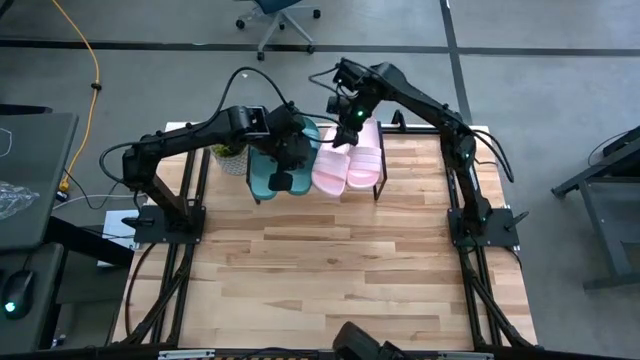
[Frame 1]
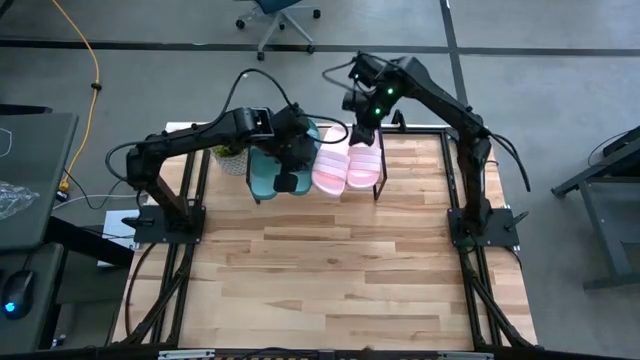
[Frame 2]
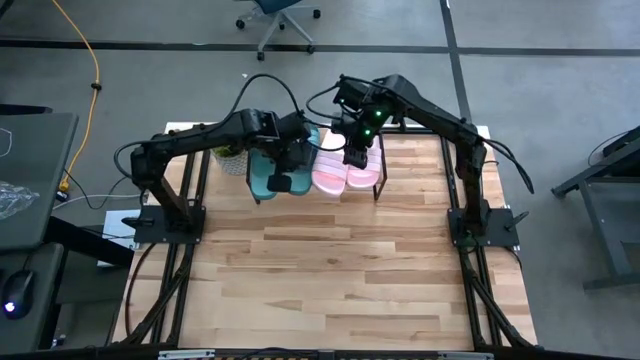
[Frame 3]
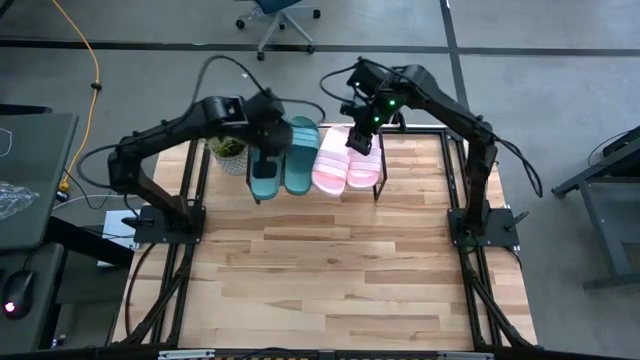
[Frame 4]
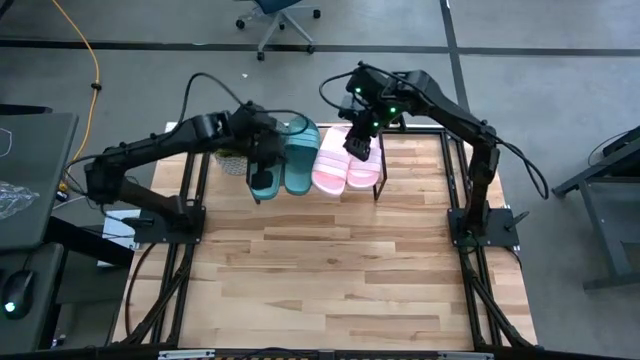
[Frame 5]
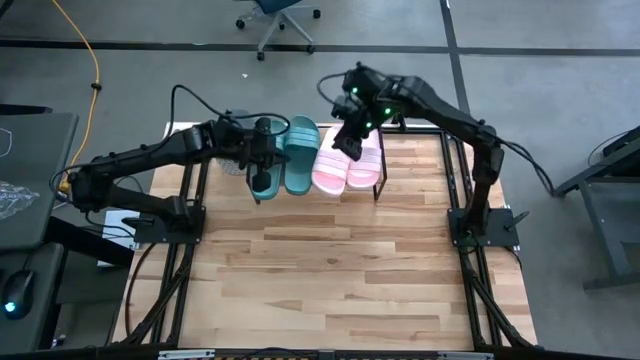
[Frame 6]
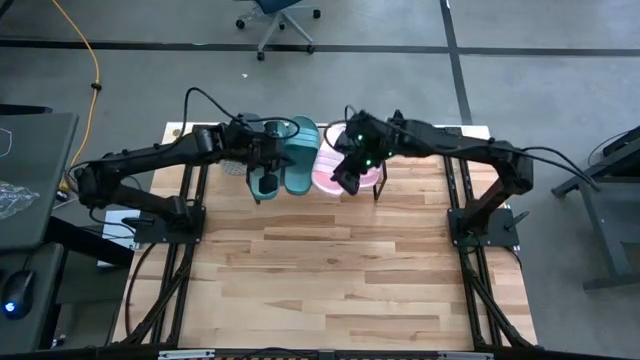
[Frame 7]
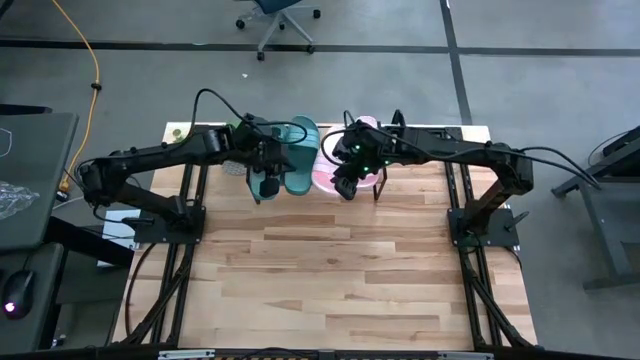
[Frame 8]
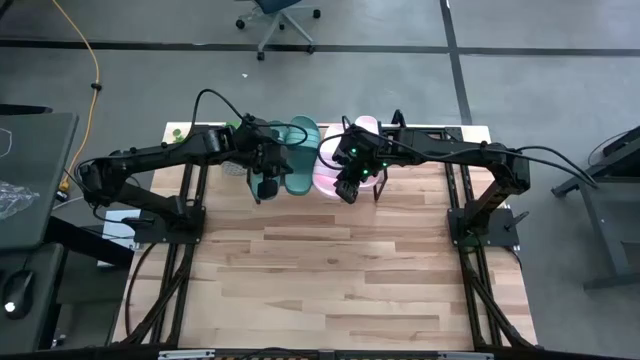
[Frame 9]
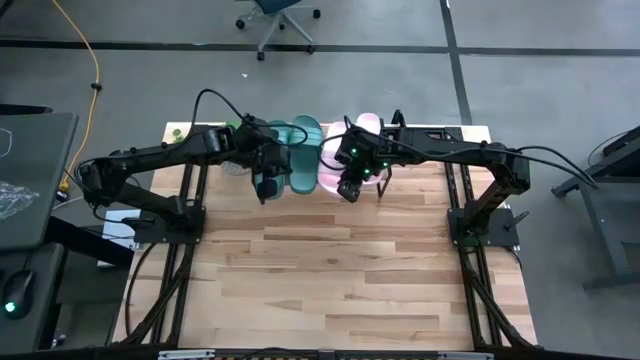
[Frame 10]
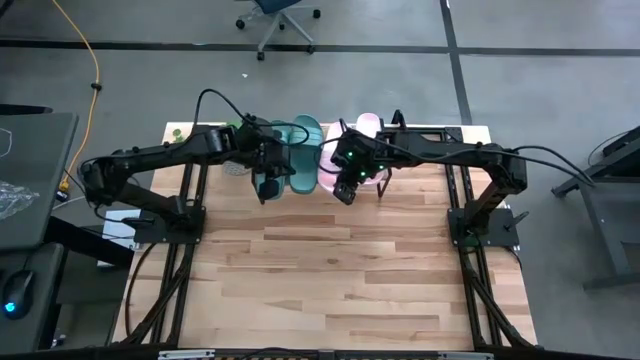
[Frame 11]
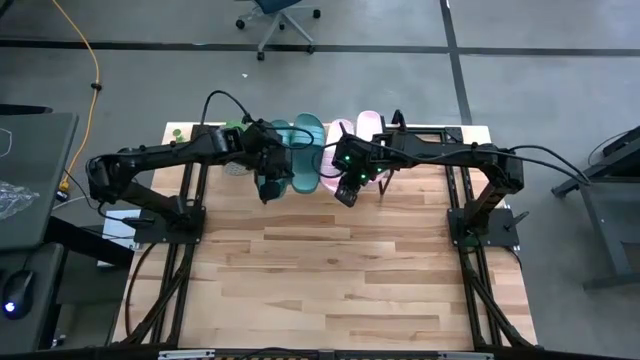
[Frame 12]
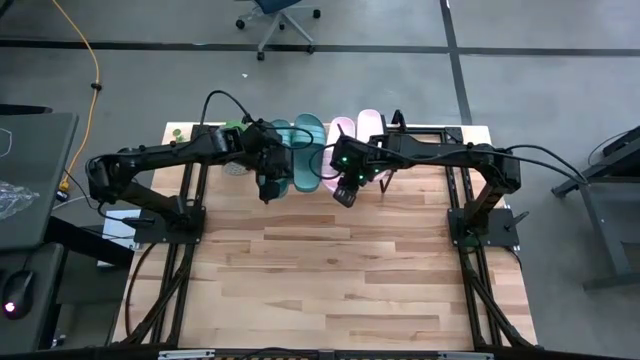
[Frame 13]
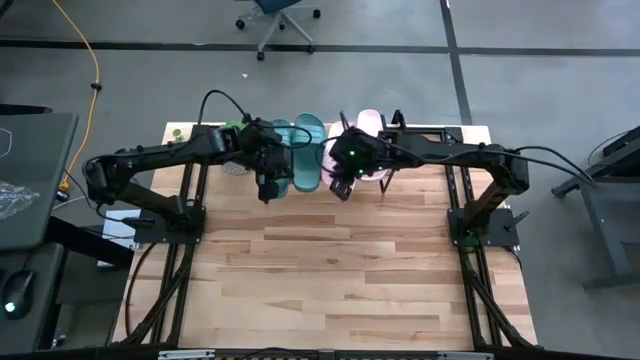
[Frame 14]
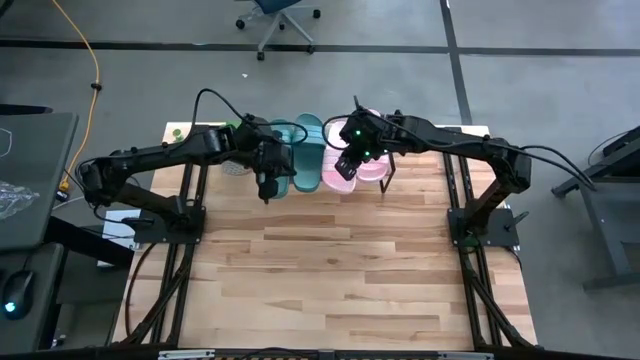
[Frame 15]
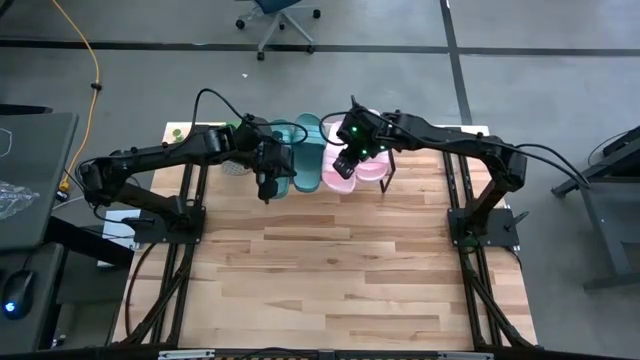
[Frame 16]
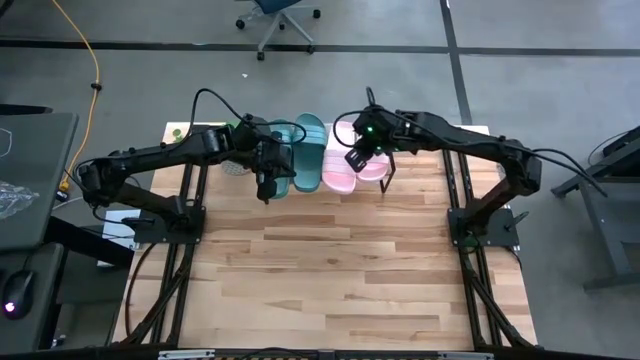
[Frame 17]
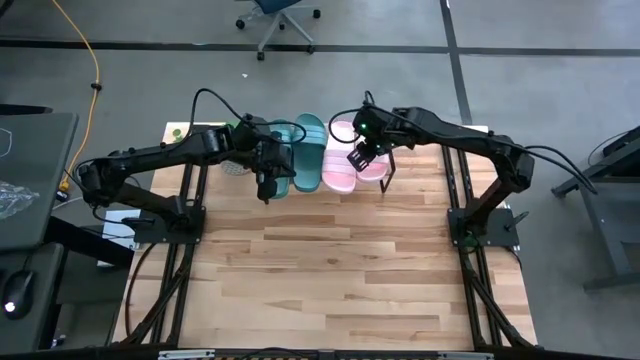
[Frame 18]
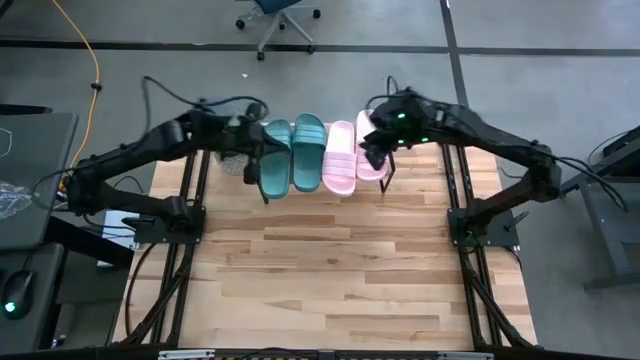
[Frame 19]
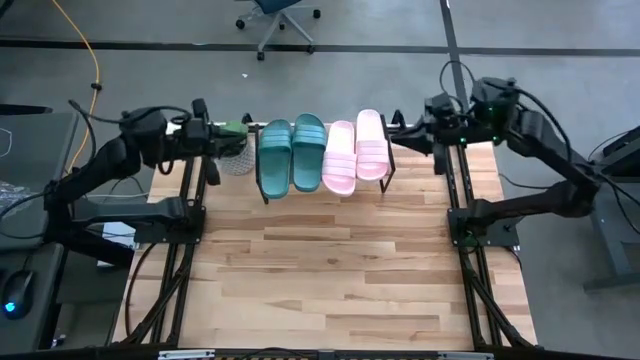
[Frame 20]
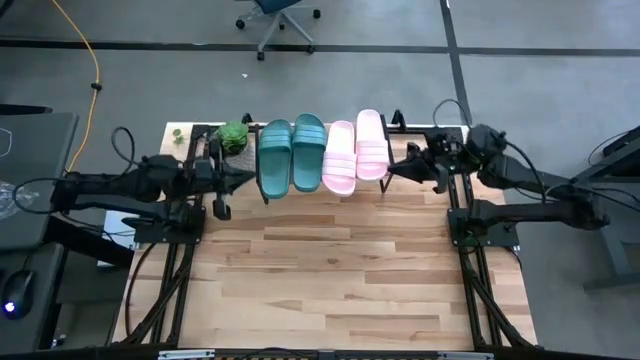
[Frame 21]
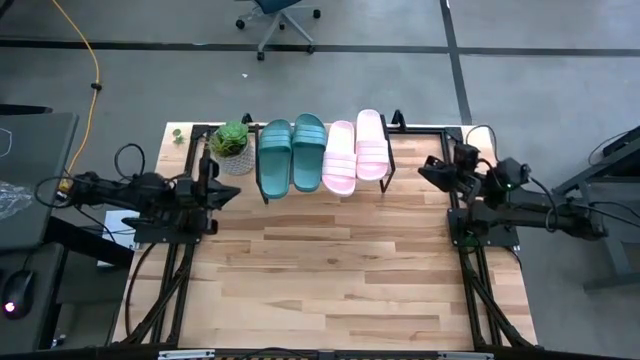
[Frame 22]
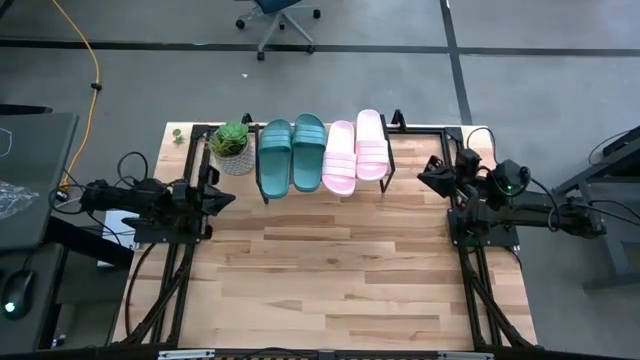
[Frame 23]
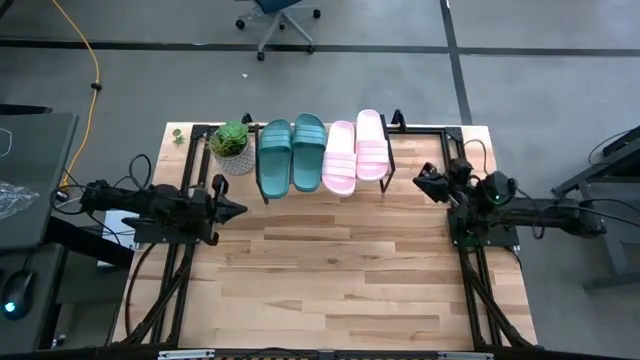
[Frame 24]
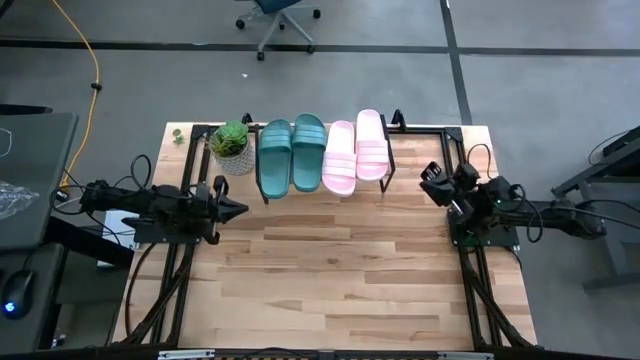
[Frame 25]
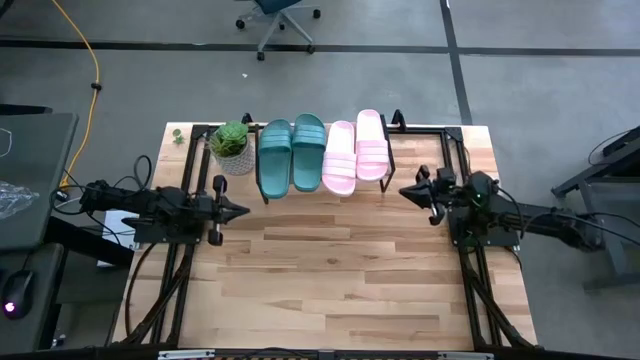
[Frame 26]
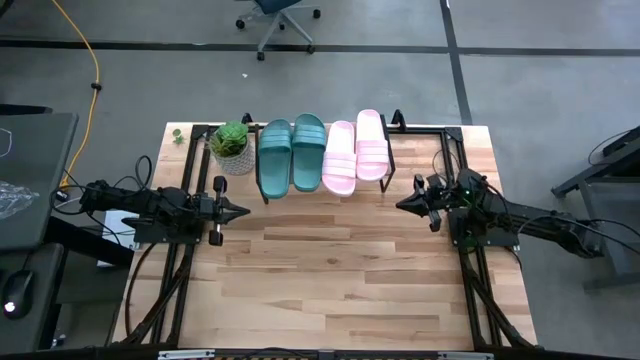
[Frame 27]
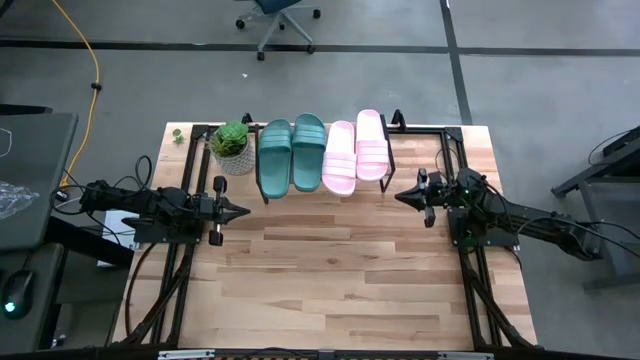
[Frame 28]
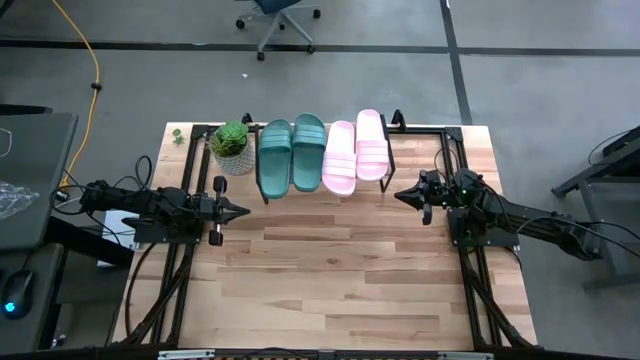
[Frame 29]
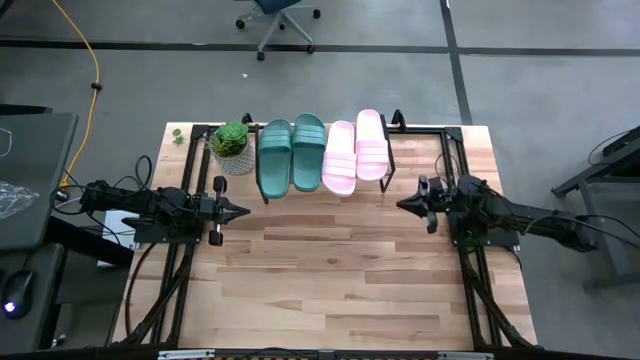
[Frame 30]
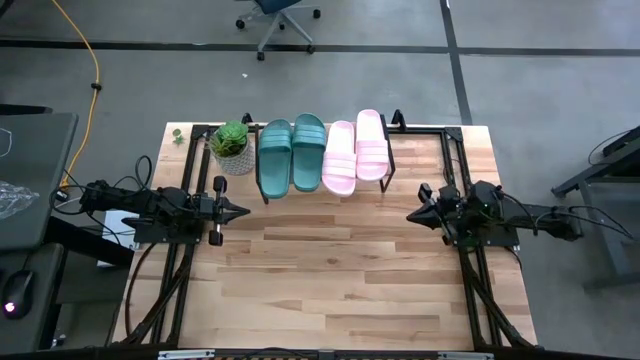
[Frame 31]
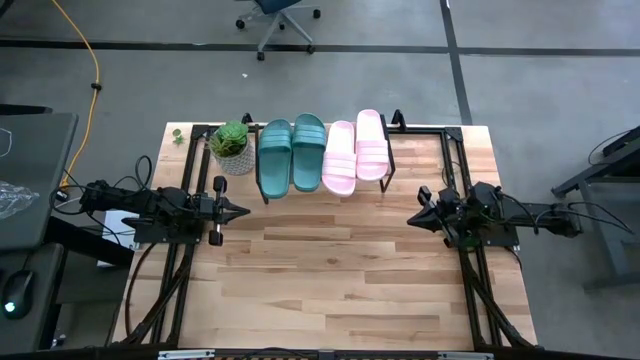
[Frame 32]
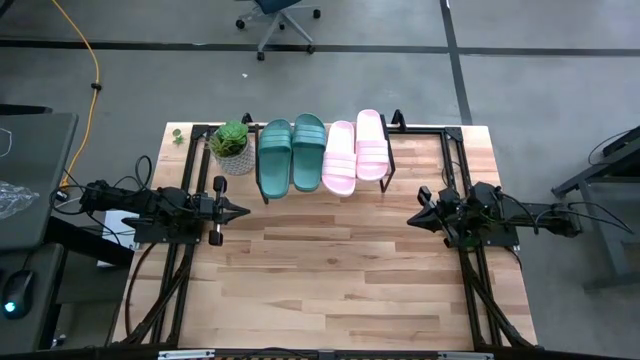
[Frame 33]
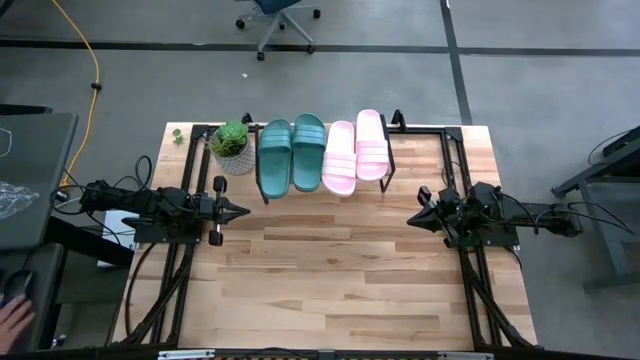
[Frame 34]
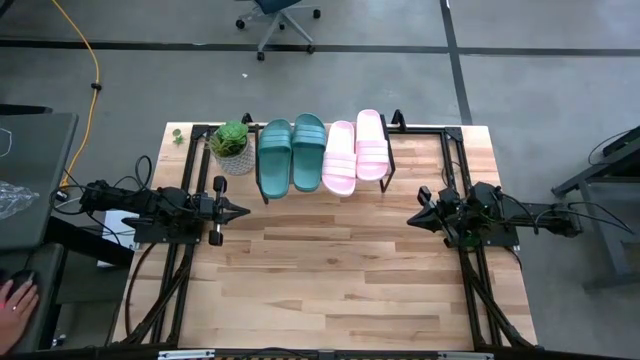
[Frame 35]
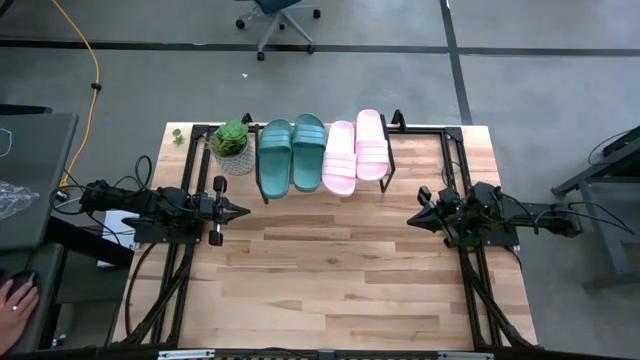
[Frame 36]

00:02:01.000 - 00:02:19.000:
Task: Pick and place slides into the shelf
Return to Home Position
